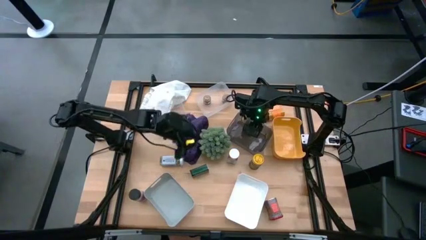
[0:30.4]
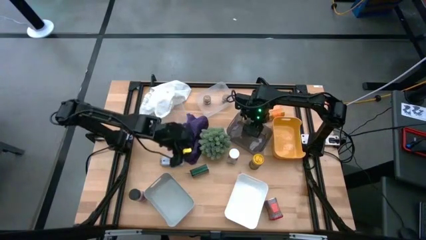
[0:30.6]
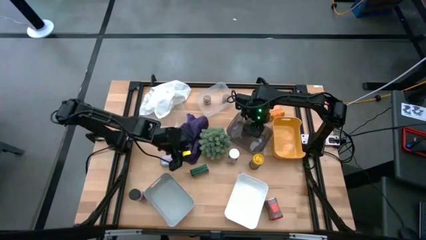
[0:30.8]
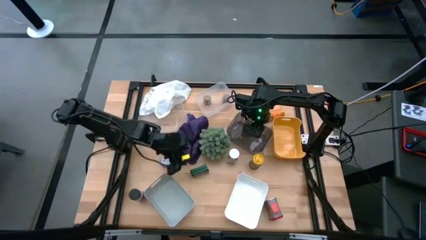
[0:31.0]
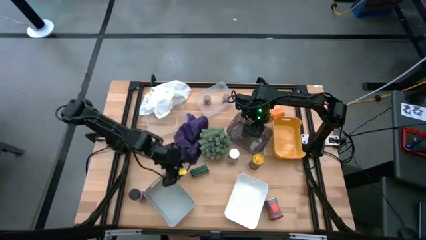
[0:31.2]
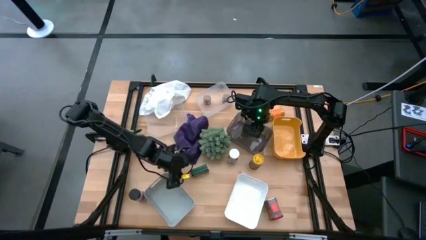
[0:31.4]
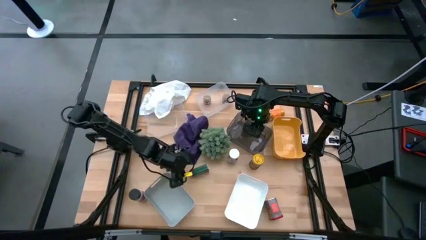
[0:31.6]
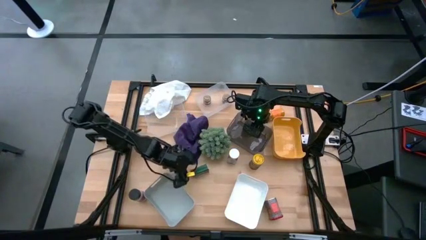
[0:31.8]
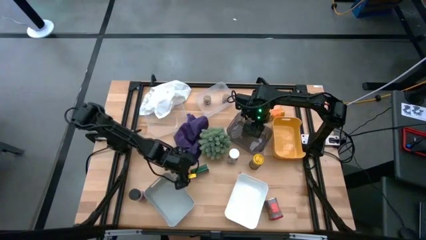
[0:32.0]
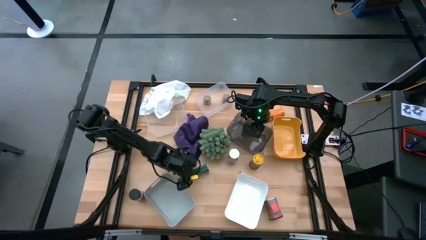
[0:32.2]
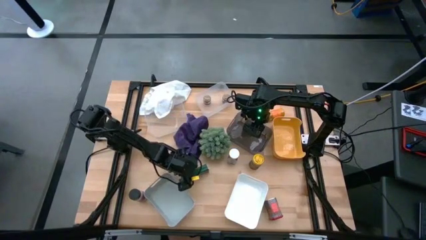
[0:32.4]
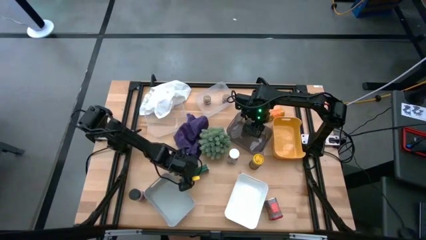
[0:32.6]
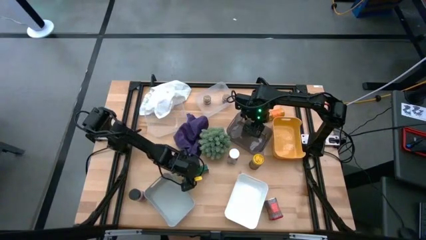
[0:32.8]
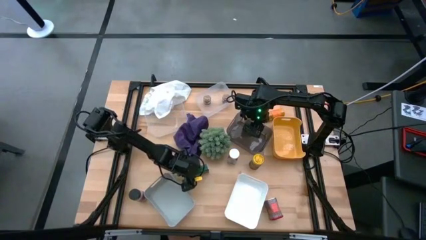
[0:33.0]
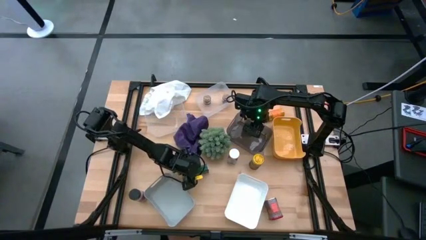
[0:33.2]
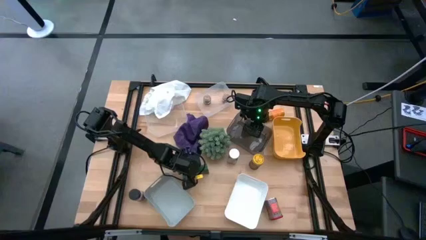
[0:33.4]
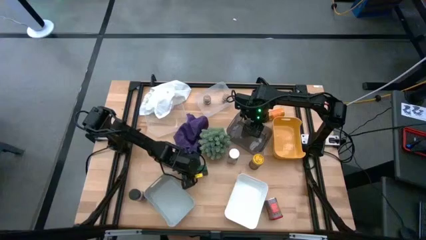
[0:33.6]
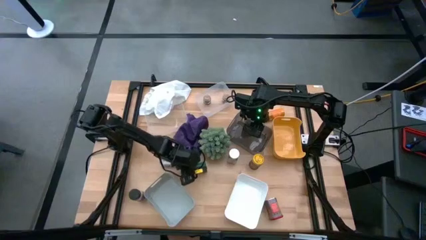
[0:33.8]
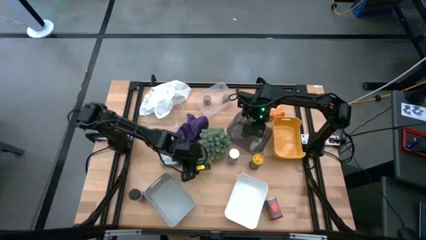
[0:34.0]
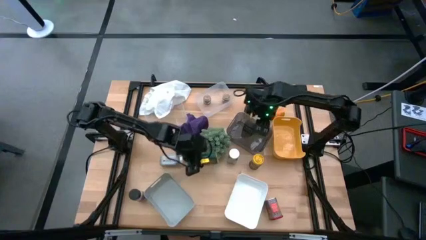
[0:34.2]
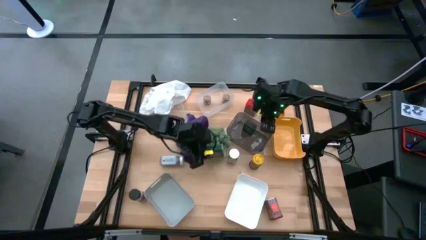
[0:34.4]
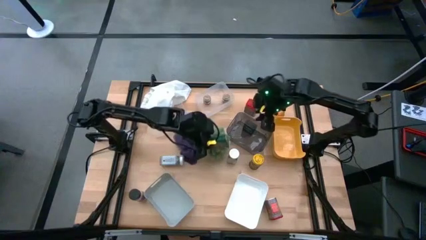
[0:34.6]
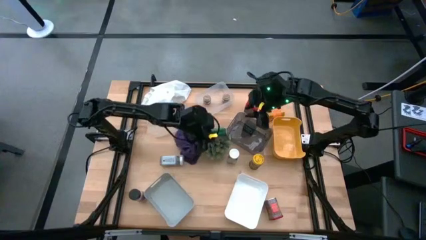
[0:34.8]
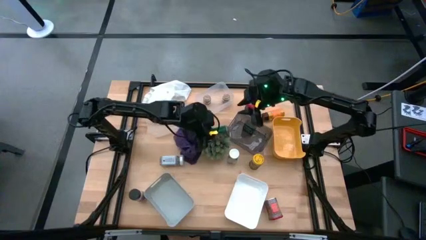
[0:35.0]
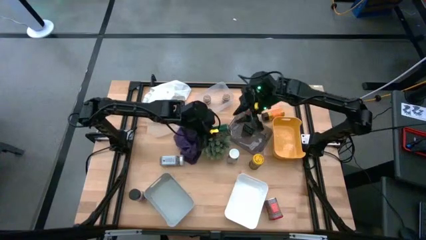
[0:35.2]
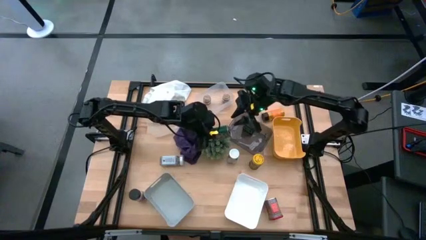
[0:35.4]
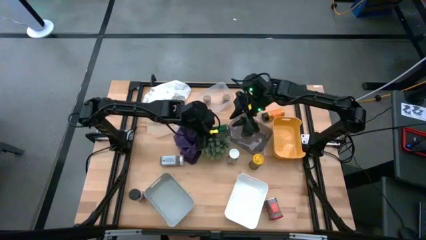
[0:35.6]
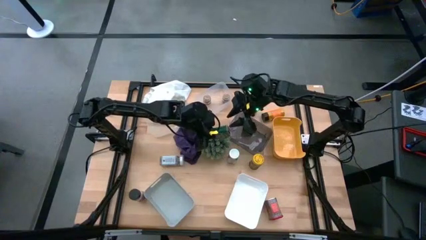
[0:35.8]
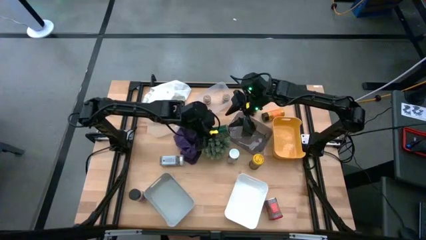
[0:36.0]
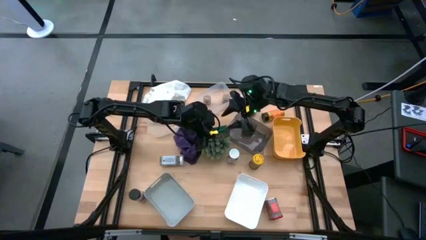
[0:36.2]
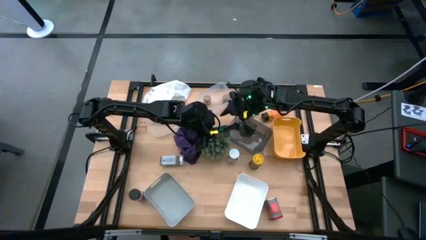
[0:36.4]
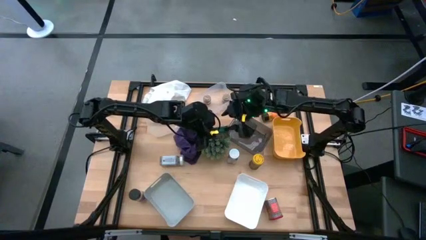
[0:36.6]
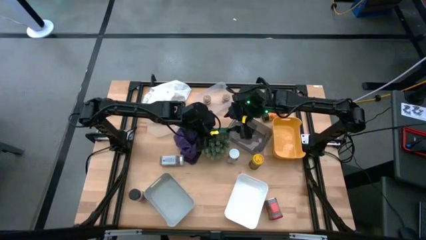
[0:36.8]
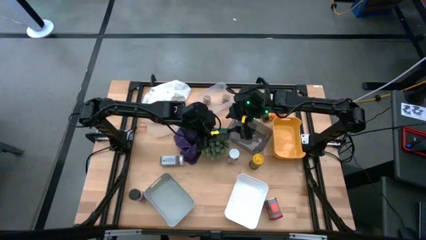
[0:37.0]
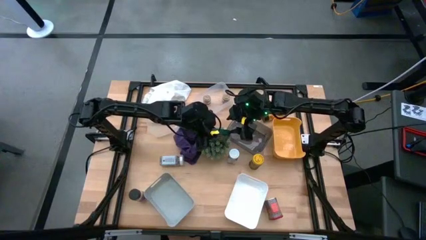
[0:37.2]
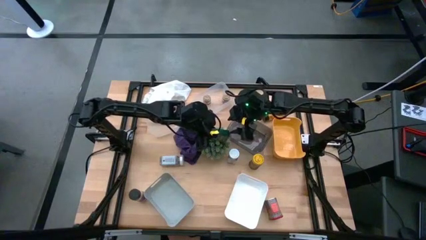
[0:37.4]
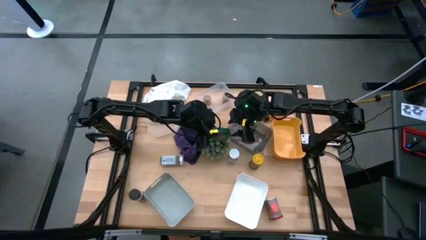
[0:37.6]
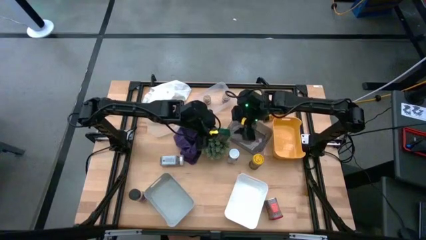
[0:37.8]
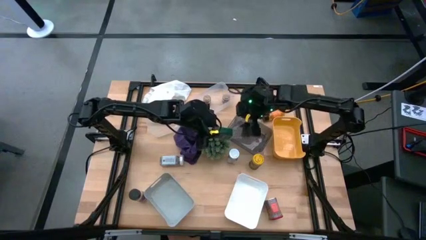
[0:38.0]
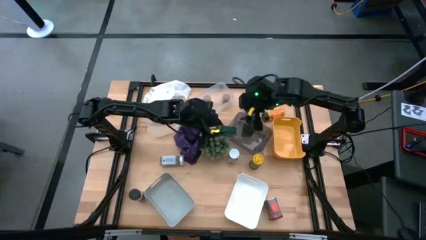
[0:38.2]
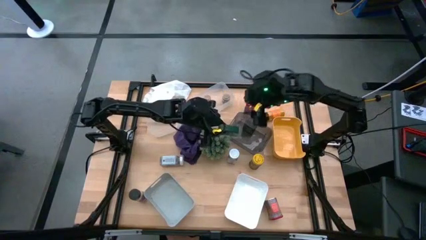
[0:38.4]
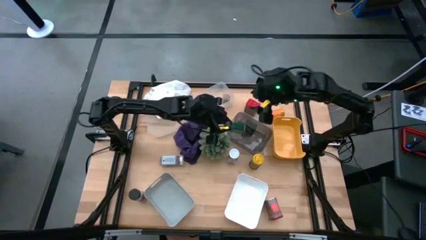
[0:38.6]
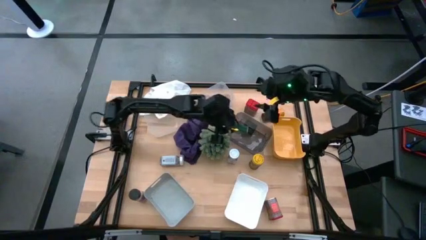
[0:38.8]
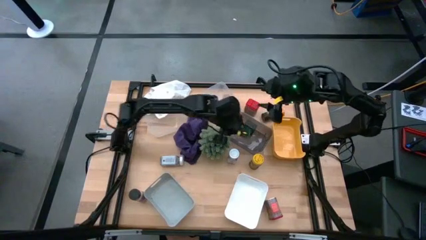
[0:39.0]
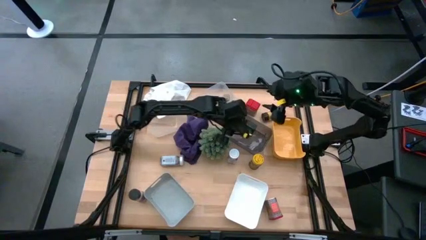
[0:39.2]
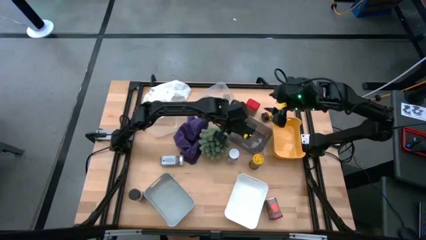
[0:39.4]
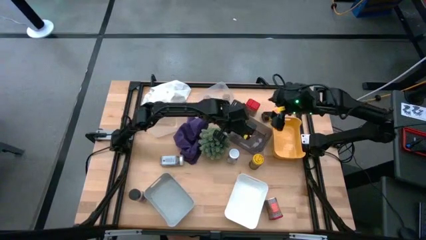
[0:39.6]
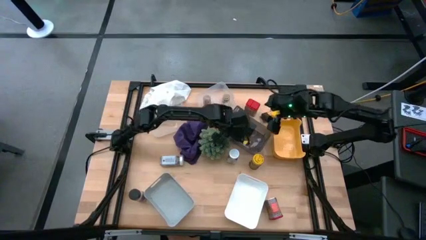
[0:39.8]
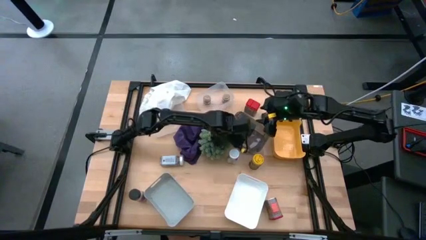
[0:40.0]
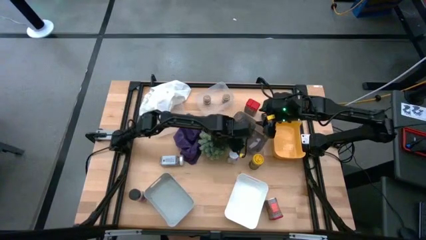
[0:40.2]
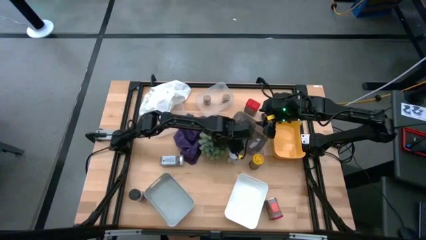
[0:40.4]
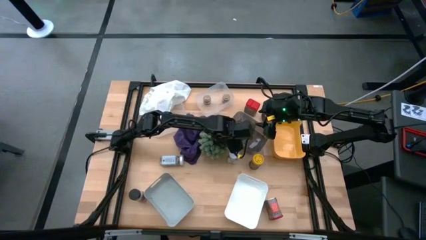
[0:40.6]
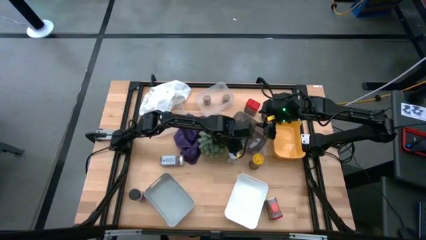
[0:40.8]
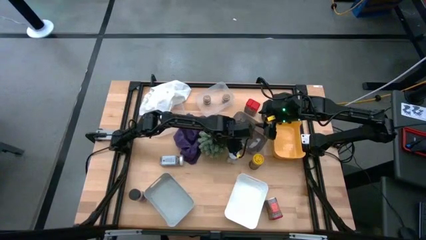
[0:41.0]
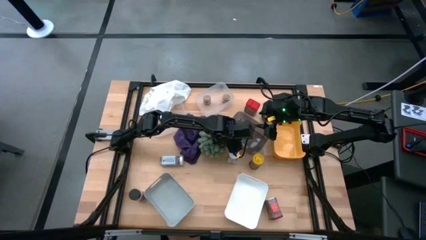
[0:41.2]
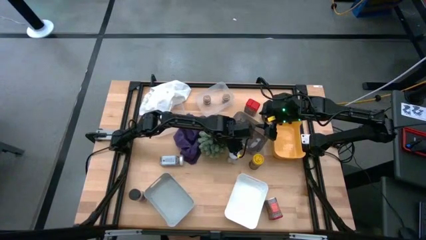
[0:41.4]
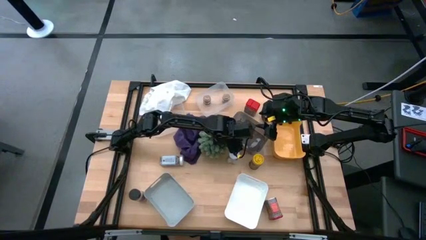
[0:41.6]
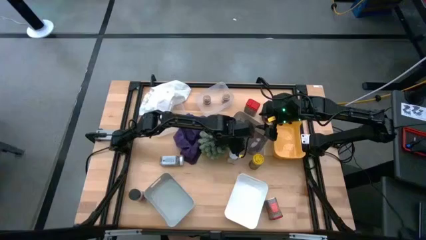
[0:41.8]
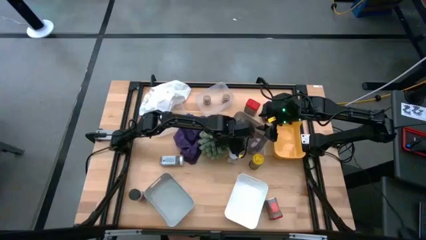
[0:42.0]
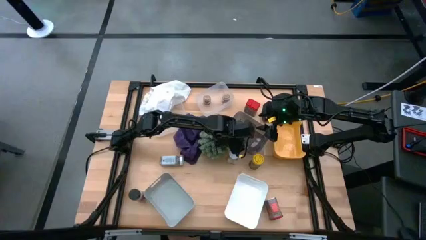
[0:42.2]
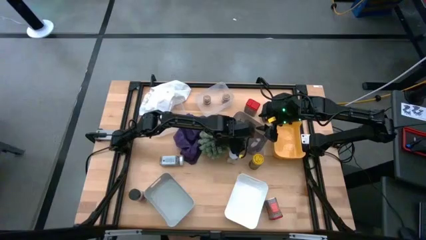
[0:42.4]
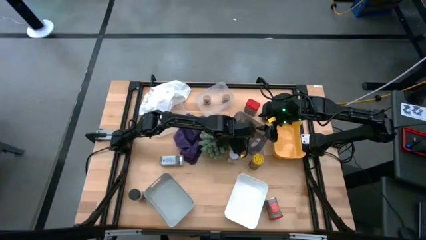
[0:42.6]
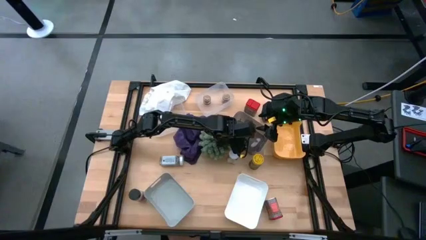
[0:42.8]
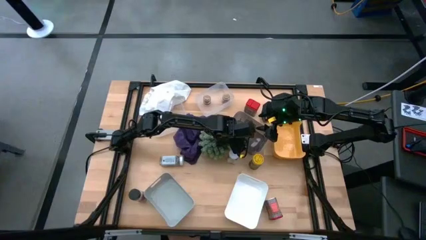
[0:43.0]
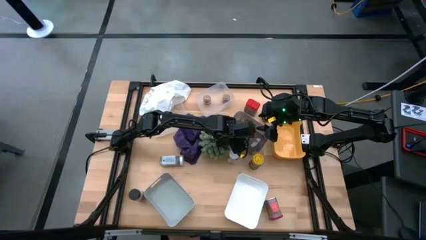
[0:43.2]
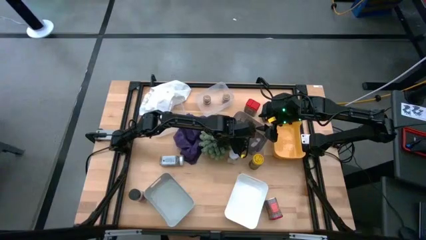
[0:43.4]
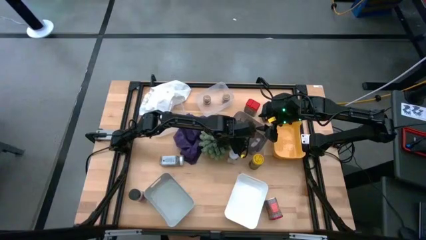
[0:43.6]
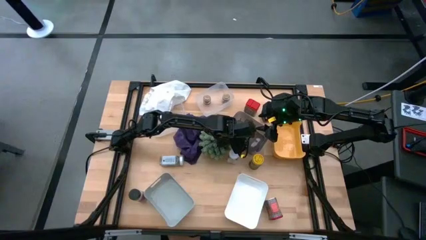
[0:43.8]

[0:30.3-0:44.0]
Task: Sort spices by type
Put the green seasoning can into the black bin
